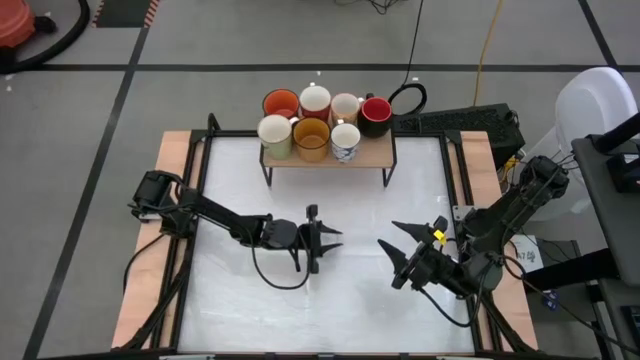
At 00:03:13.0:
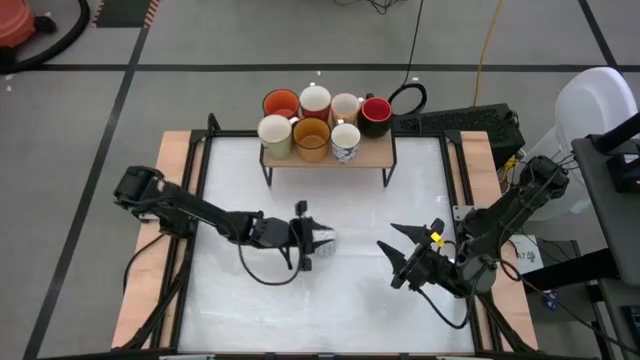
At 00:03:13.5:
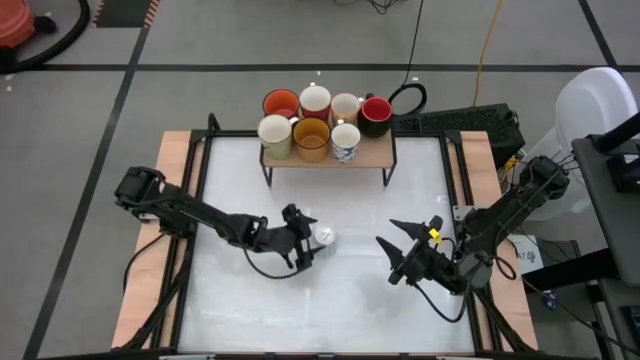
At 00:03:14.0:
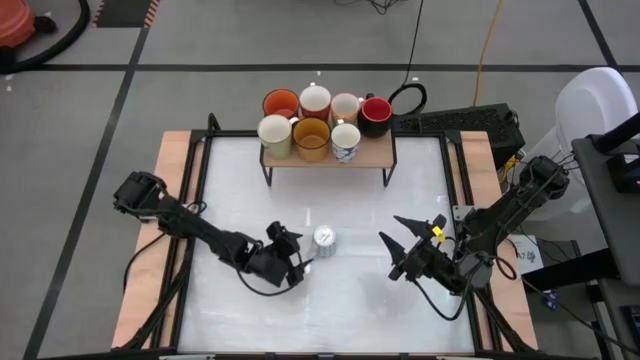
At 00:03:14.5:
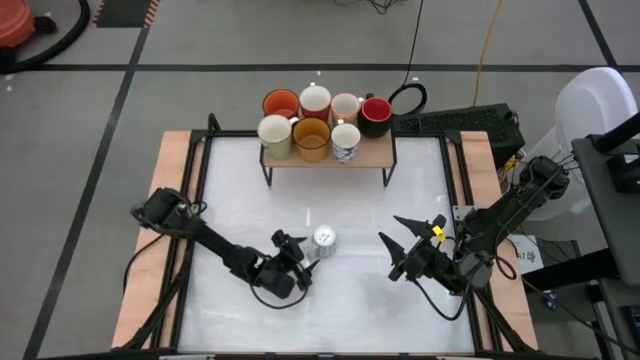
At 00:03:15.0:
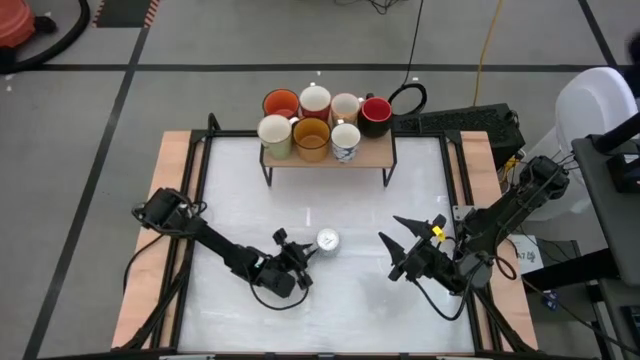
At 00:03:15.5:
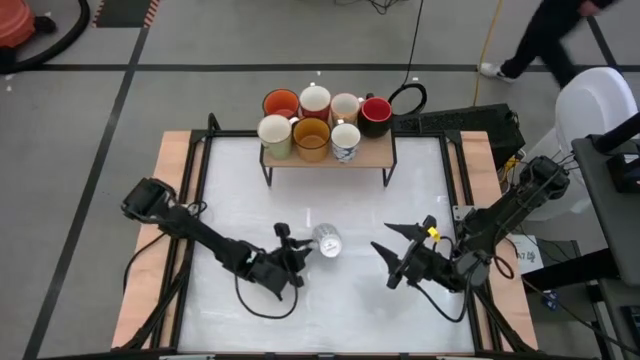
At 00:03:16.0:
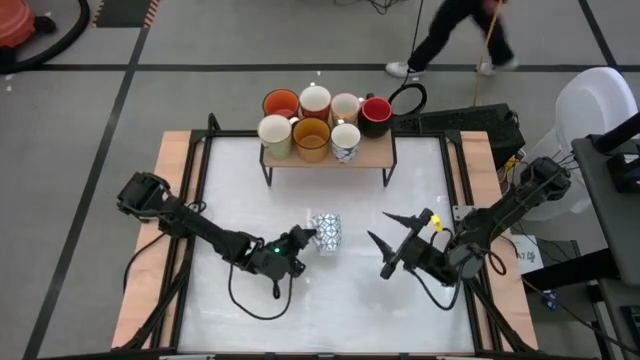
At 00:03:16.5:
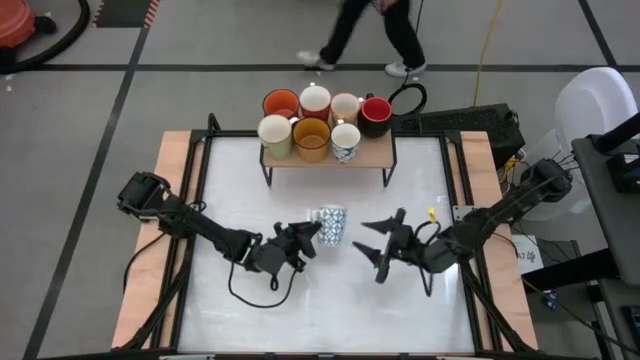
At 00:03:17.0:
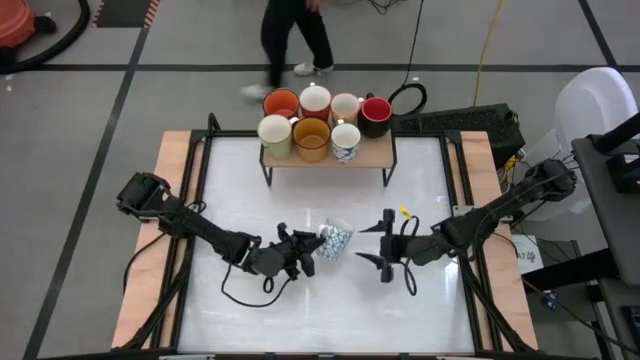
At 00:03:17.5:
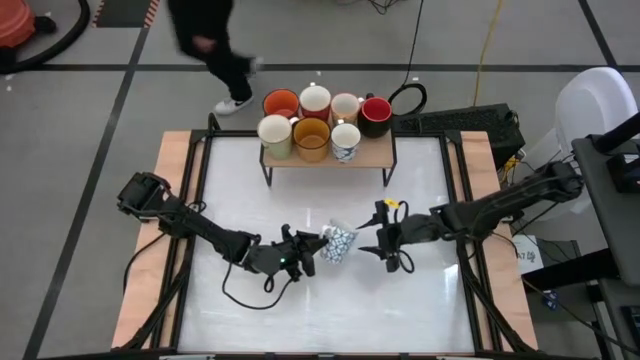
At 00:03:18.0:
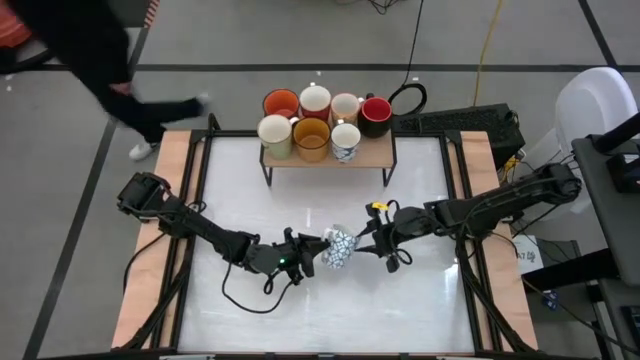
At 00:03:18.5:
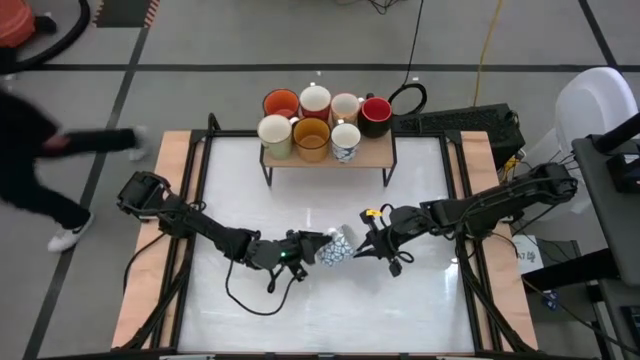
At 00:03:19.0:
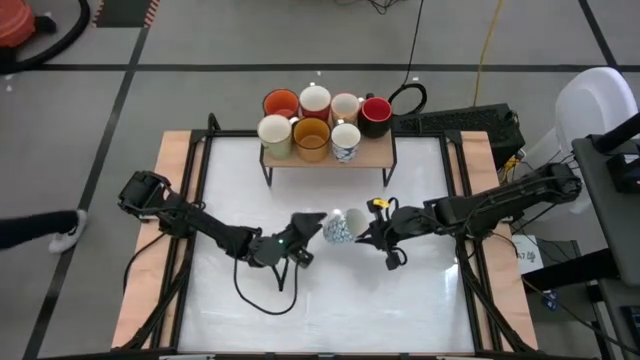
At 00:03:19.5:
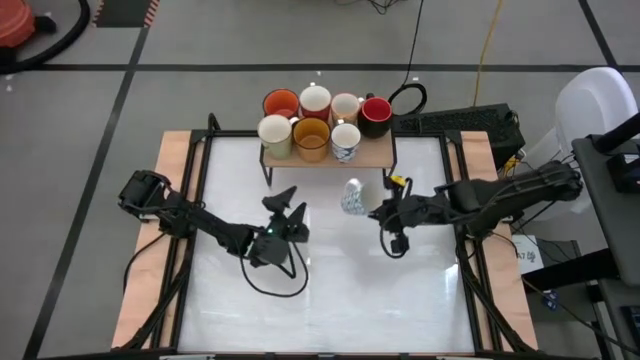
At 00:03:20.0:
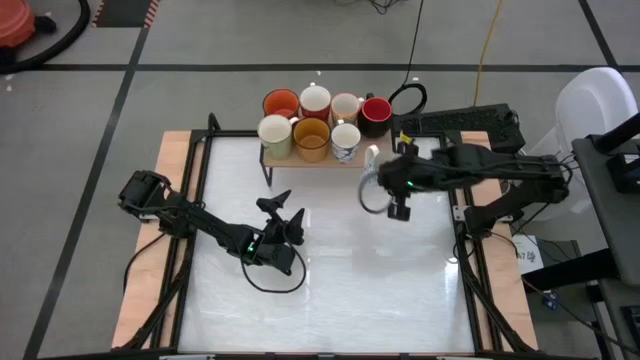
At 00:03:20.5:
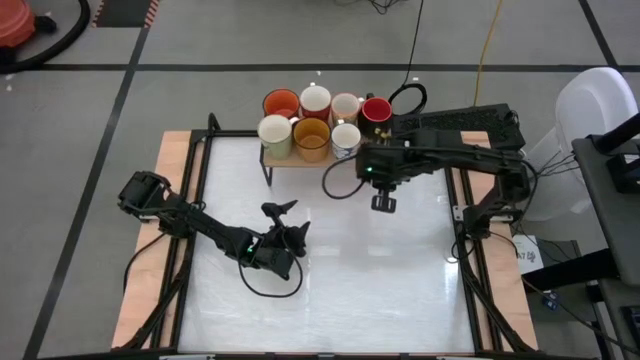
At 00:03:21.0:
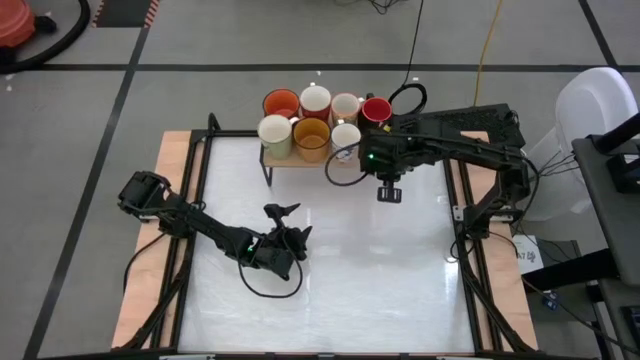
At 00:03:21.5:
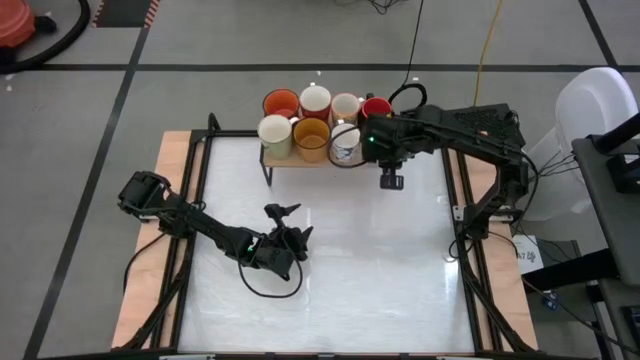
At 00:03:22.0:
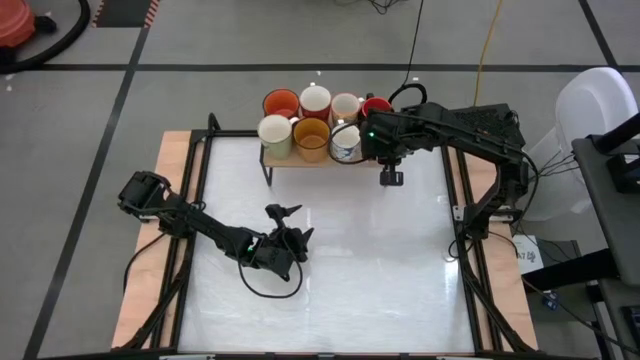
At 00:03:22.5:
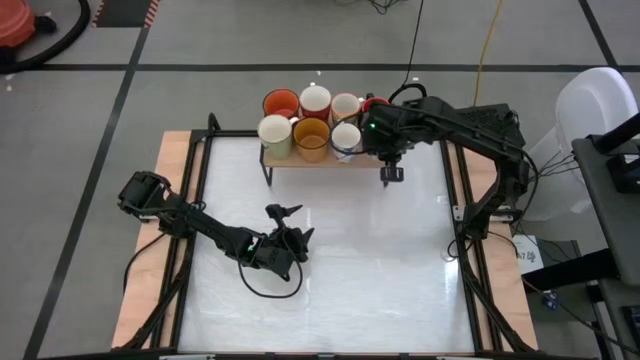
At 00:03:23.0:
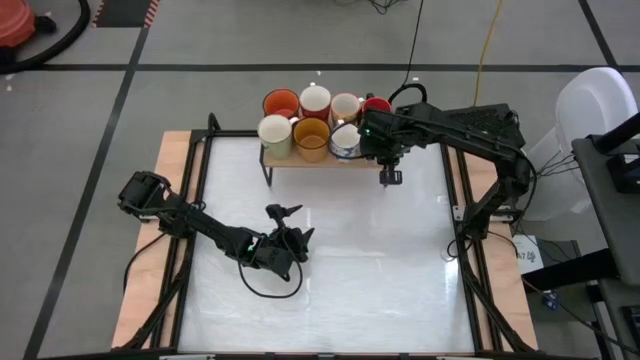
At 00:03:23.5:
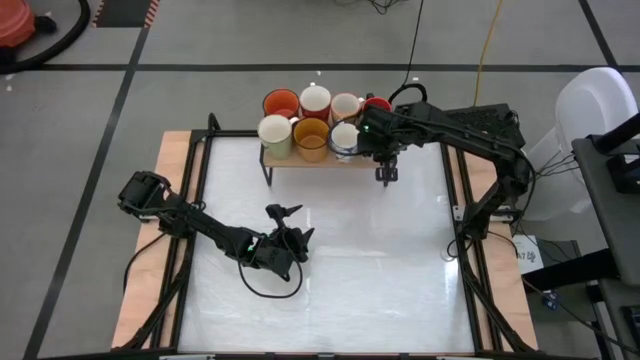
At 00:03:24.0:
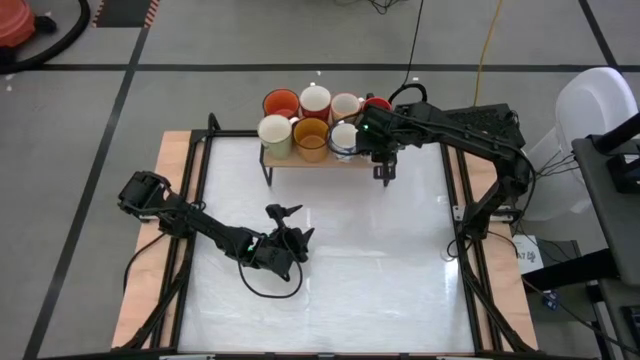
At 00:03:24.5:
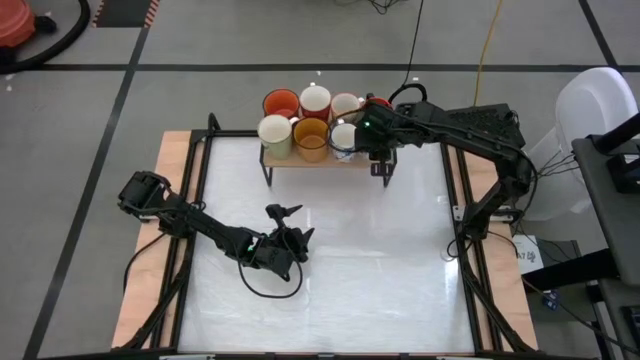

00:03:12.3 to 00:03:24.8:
Task: Place coffee mugs
Put the light blue patterned mug on the shelf

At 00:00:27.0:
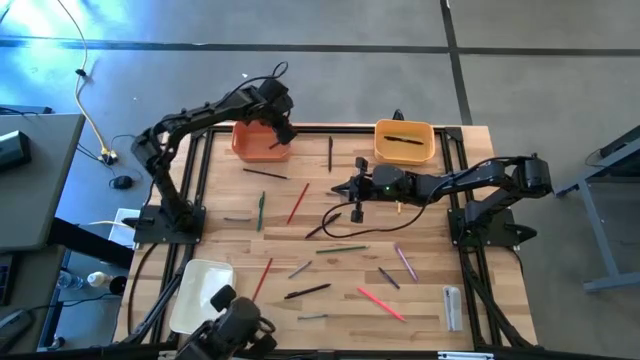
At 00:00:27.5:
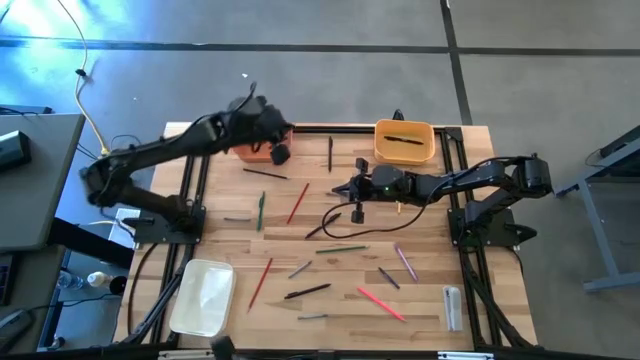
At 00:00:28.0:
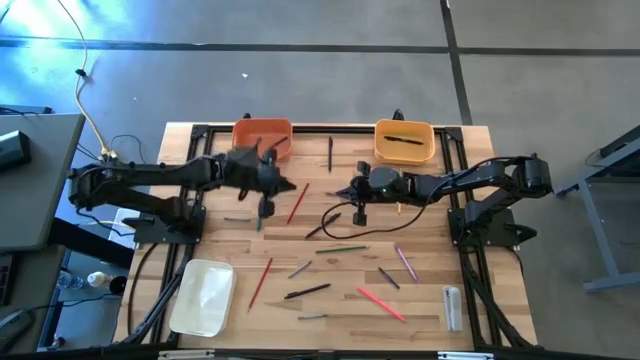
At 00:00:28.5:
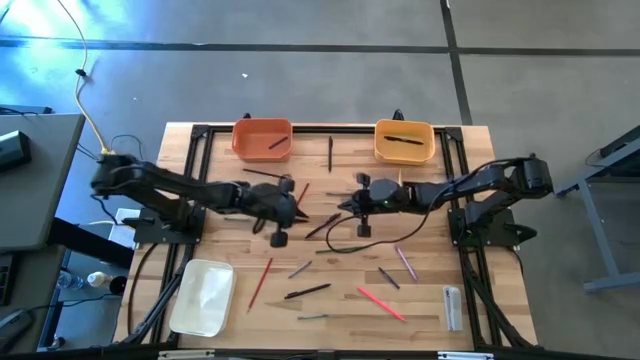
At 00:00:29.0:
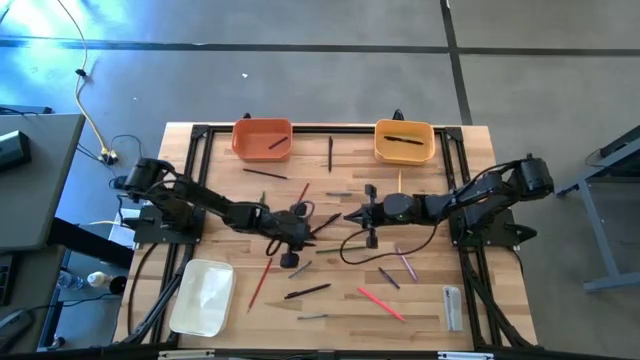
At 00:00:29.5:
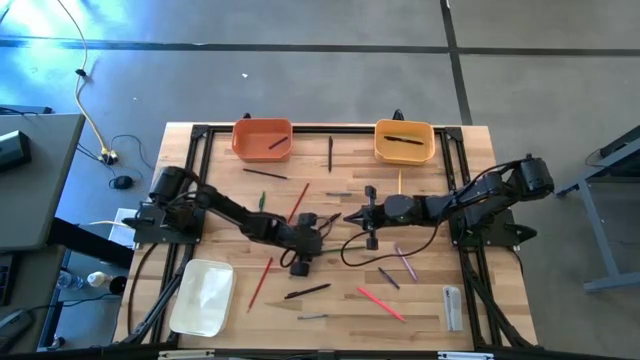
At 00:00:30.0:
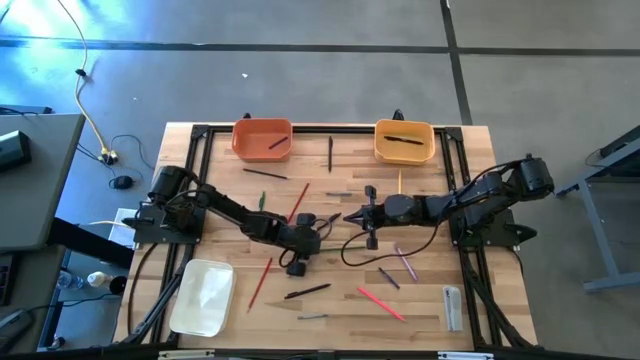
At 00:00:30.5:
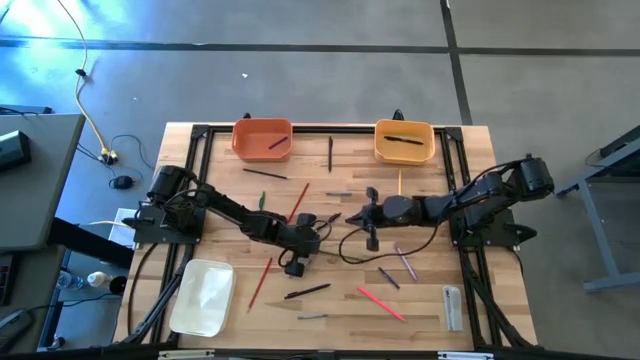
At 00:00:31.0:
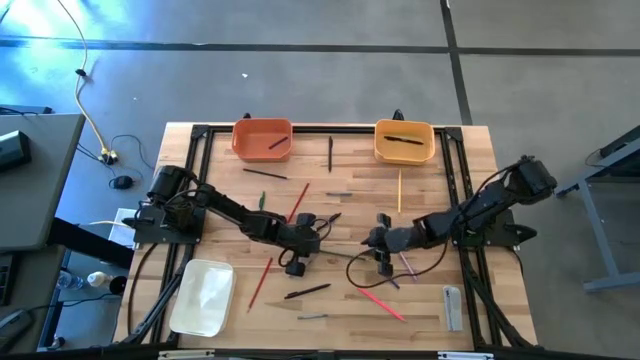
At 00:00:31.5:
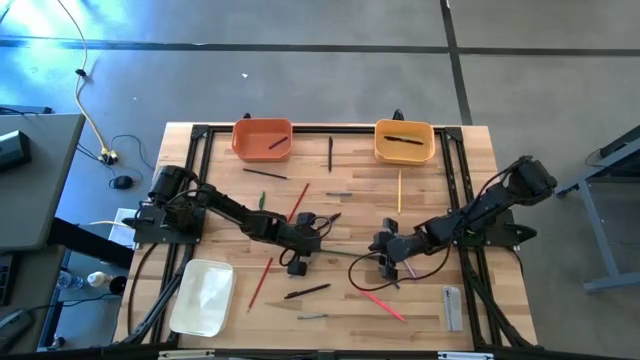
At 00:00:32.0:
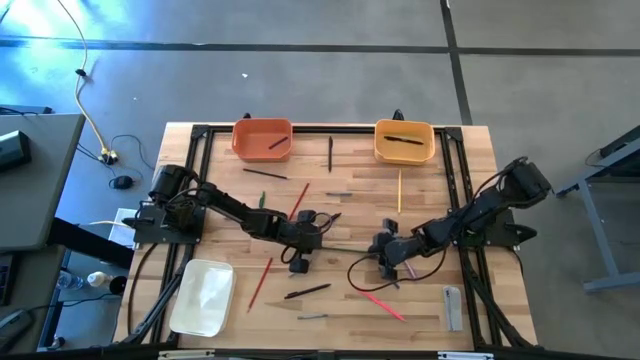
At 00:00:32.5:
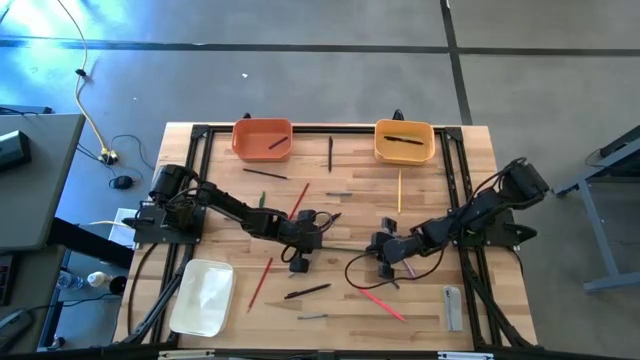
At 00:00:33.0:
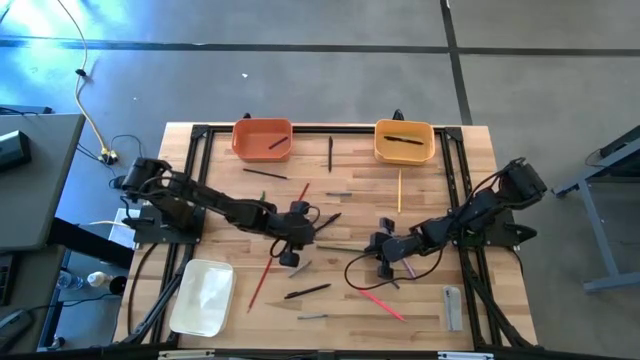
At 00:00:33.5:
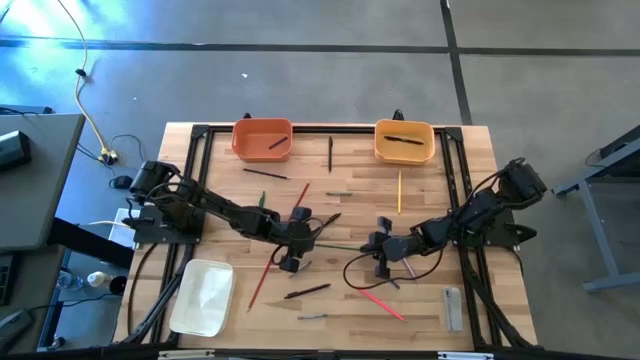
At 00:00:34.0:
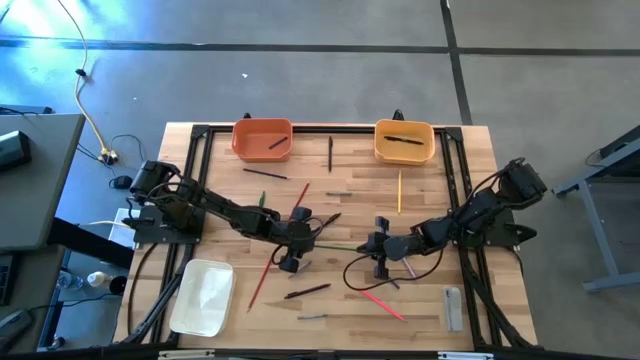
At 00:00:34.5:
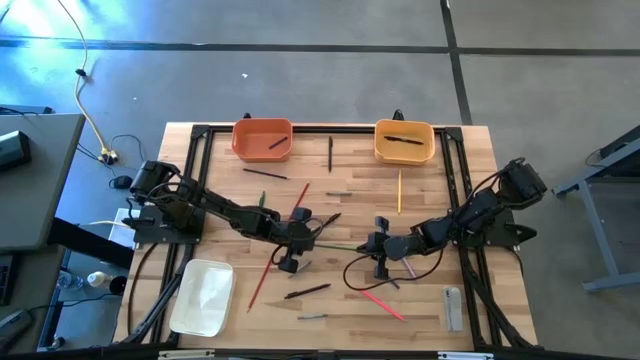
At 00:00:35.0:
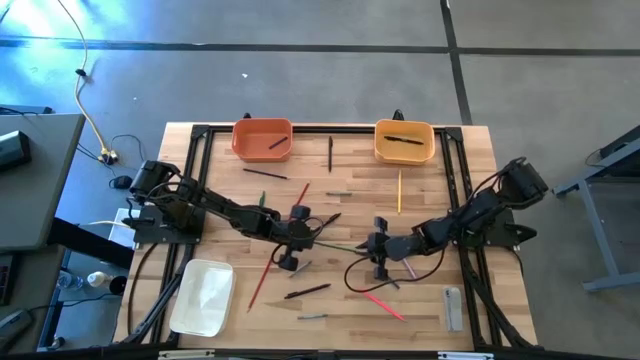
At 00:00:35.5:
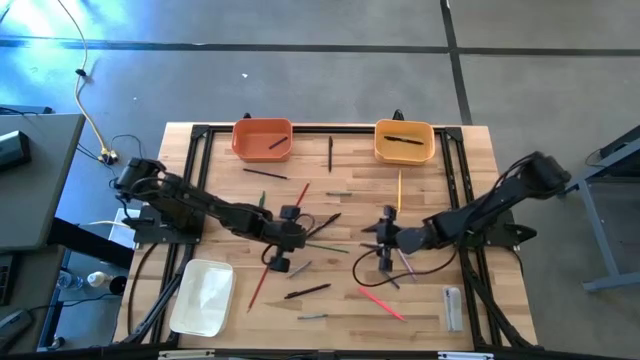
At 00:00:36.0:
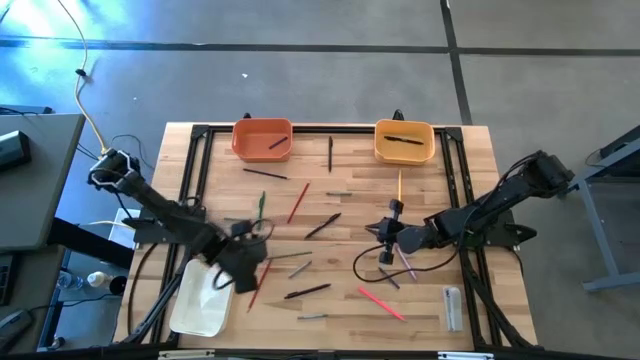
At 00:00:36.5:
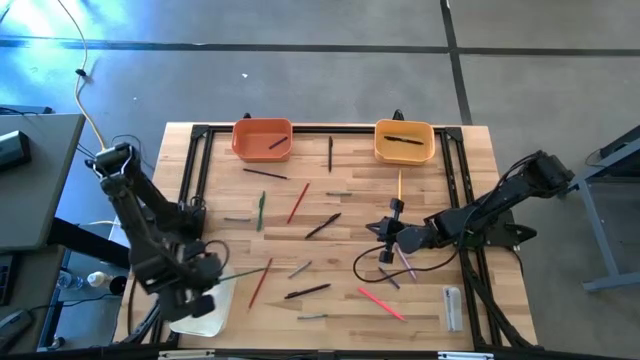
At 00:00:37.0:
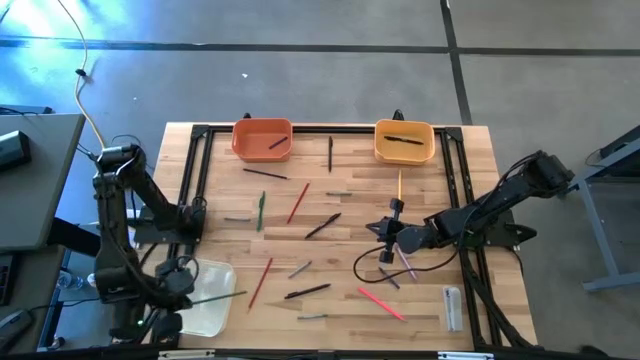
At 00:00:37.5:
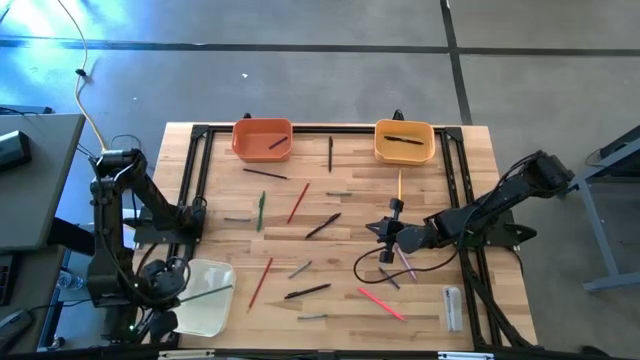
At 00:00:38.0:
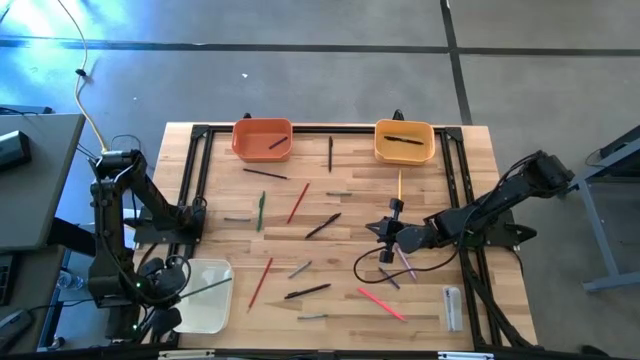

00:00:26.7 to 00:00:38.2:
Task: Sort crayons/erasers/pens/pencils in bins
Put the green colored pencil into the white bin
